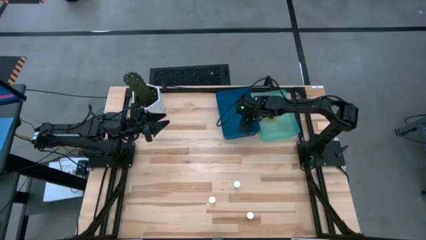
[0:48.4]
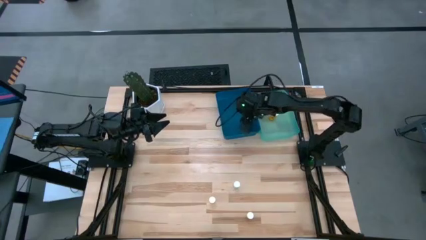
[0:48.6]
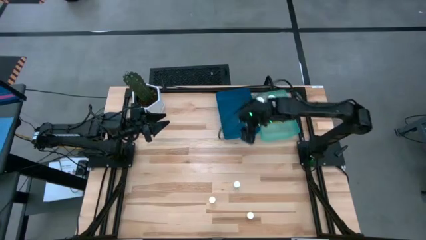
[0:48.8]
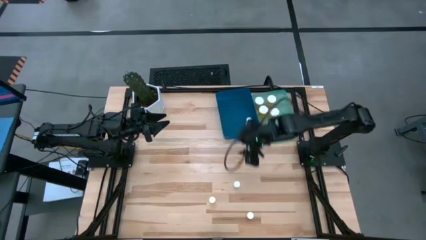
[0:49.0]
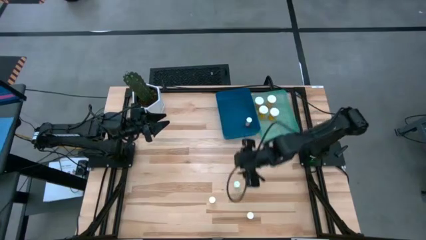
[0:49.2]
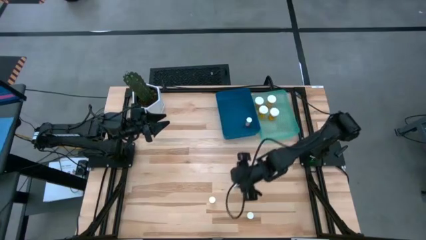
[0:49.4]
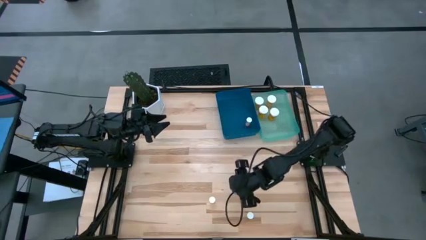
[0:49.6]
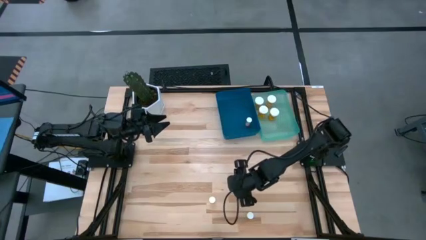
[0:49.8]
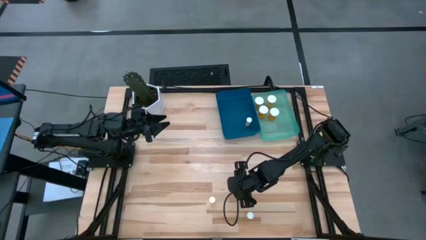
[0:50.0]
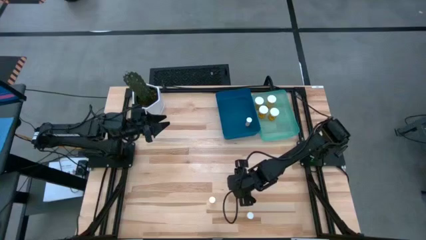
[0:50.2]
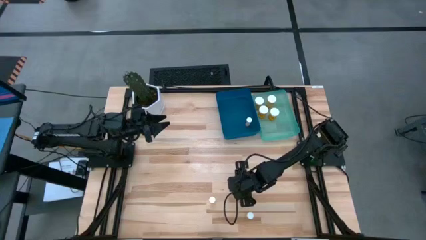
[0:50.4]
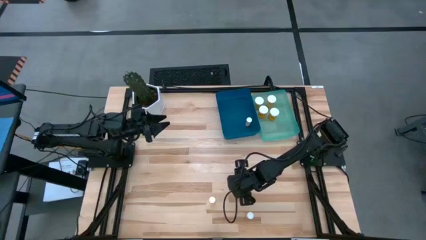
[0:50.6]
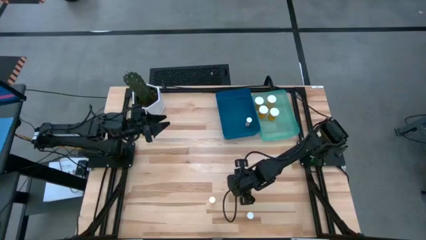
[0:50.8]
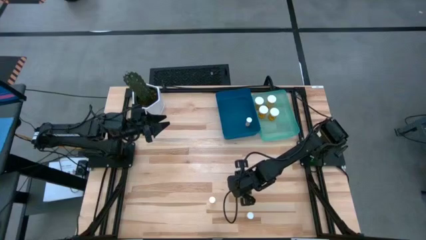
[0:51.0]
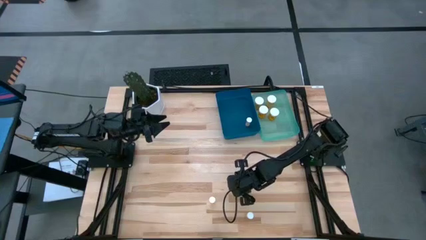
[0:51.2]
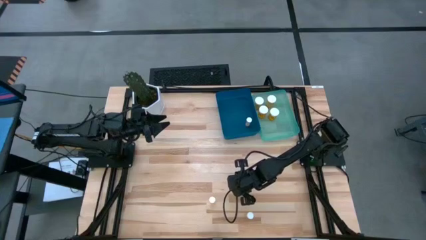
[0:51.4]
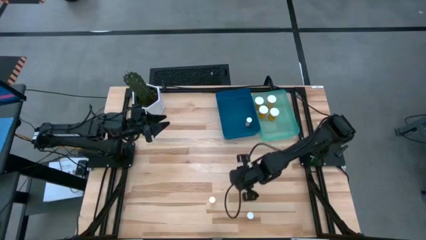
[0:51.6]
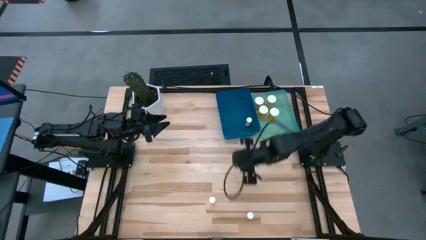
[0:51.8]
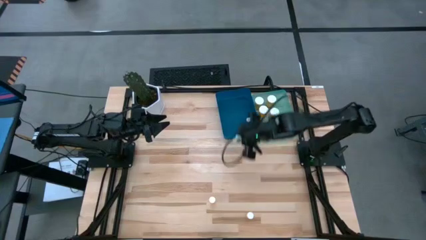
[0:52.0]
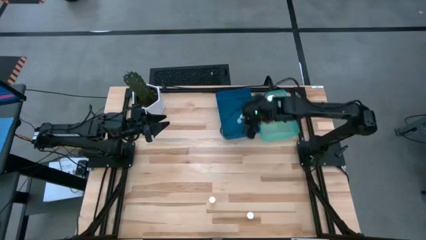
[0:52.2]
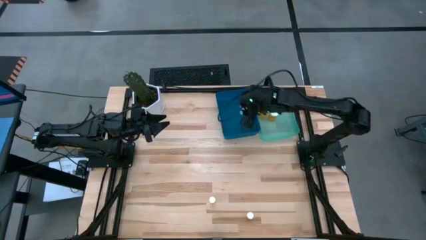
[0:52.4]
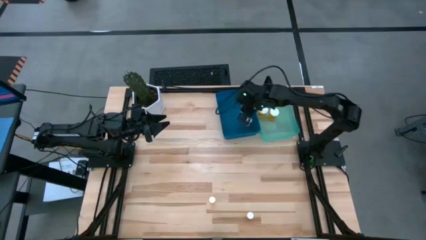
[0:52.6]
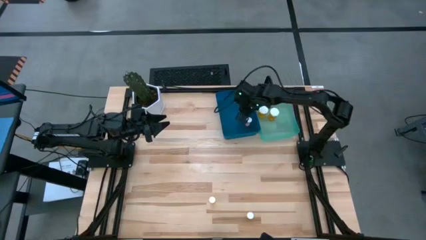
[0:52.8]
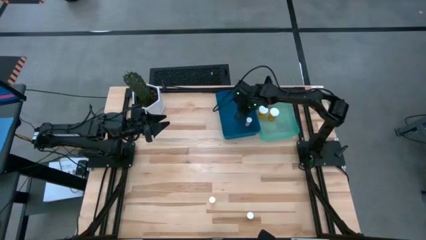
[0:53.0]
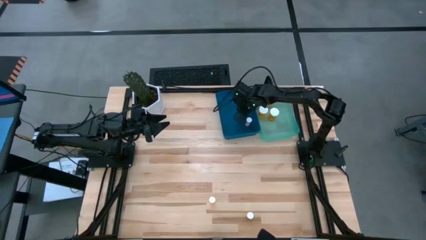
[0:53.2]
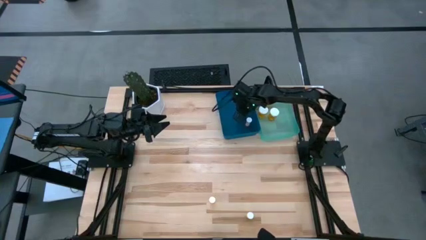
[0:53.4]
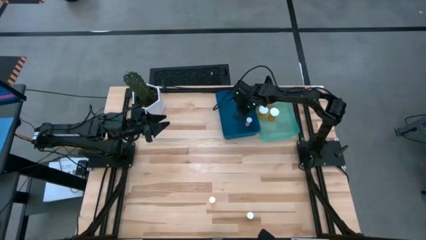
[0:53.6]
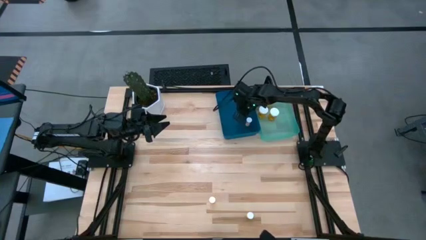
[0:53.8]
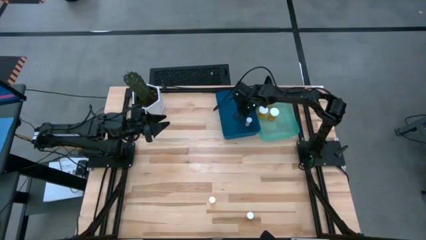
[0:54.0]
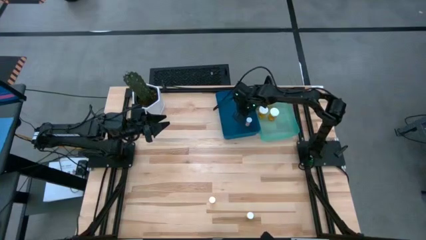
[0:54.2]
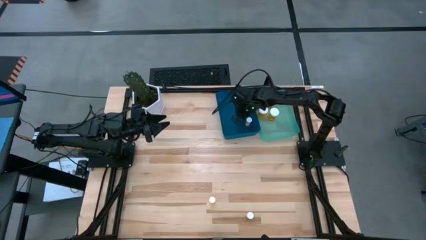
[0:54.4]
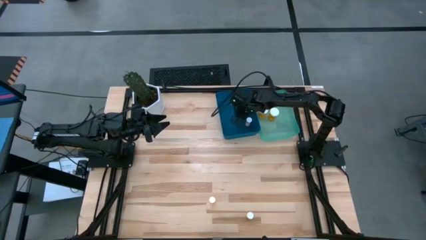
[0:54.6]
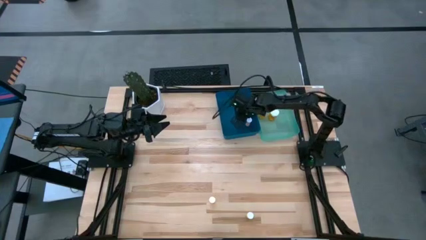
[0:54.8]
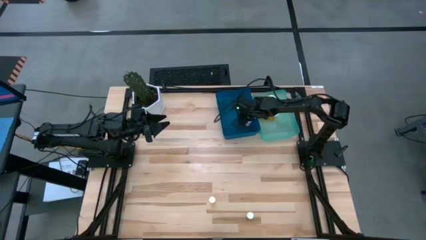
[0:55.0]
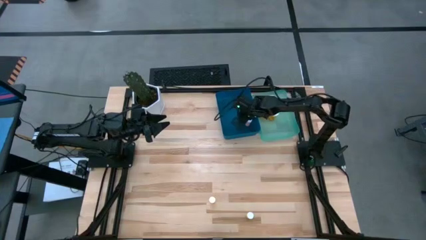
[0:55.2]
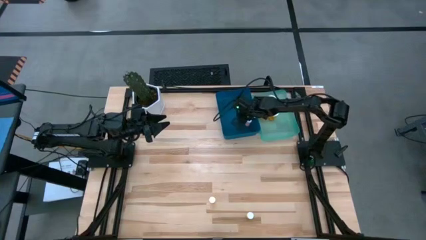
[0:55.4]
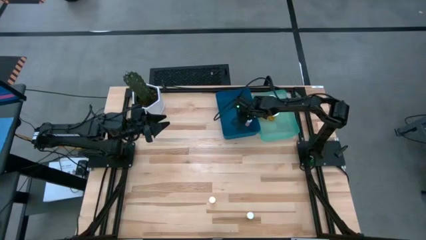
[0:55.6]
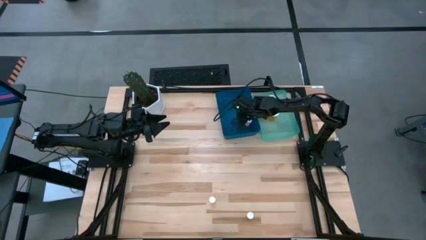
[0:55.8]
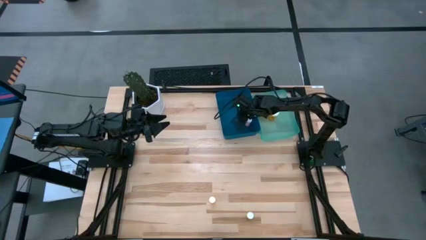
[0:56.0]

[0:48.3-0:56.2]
Task: Pick and place medicine bottles into bin by pill shape (circle, oval)
Put the blue tablet bottle into the dark blue bin

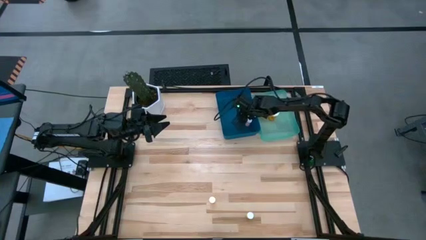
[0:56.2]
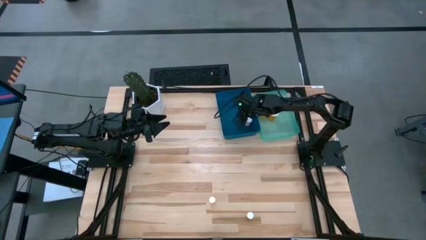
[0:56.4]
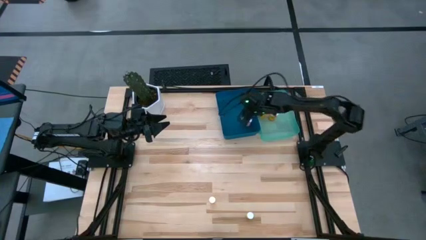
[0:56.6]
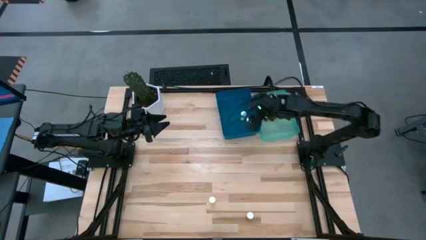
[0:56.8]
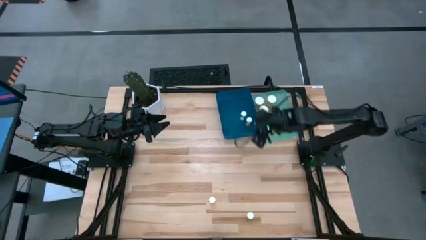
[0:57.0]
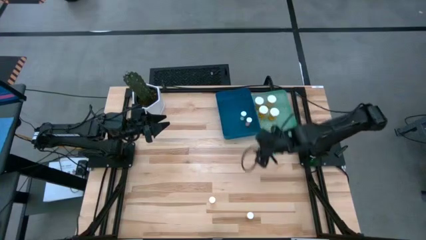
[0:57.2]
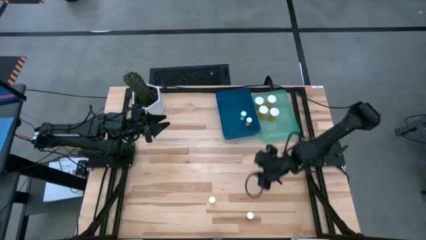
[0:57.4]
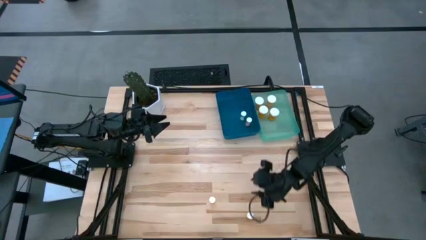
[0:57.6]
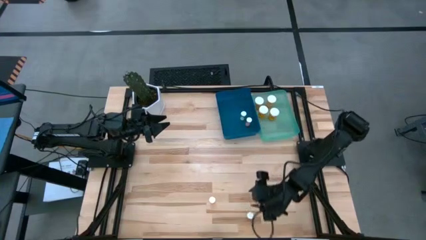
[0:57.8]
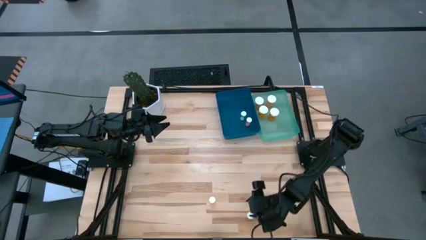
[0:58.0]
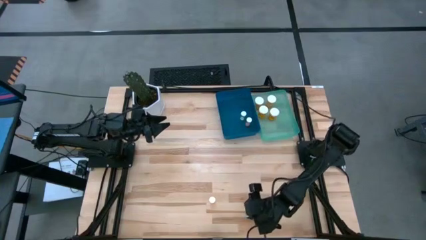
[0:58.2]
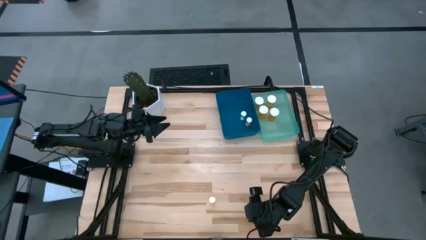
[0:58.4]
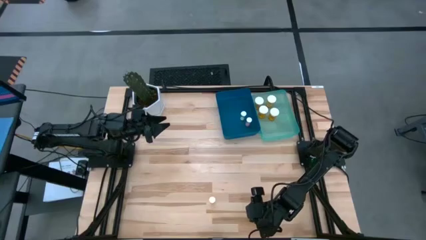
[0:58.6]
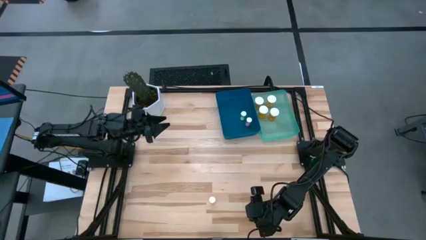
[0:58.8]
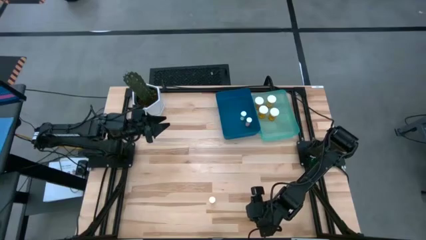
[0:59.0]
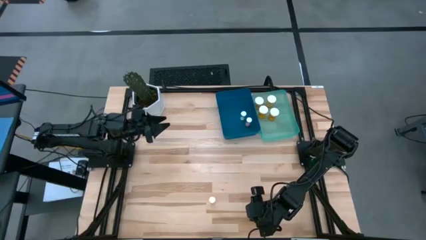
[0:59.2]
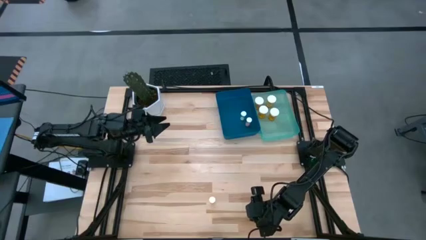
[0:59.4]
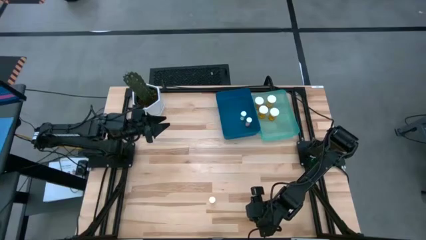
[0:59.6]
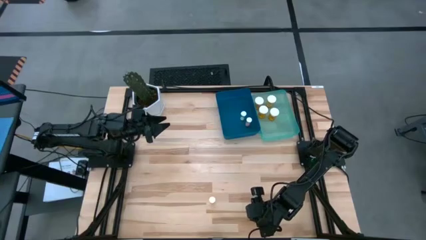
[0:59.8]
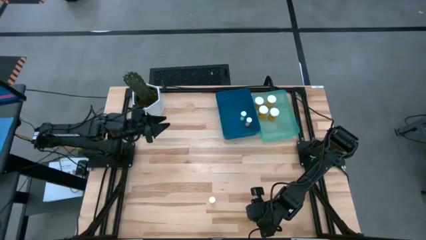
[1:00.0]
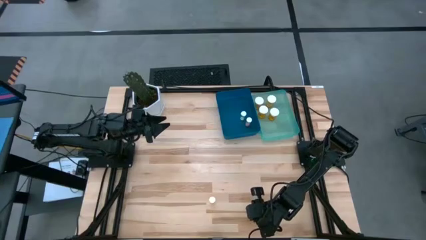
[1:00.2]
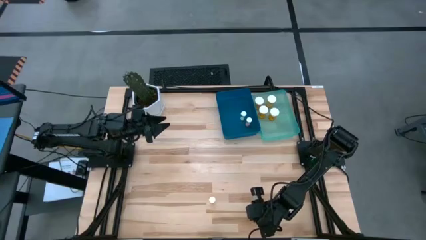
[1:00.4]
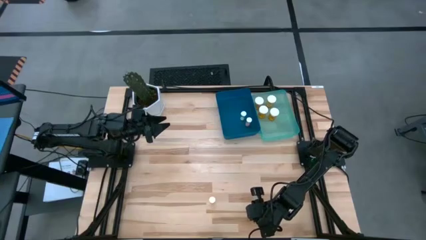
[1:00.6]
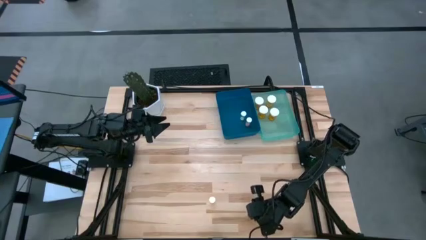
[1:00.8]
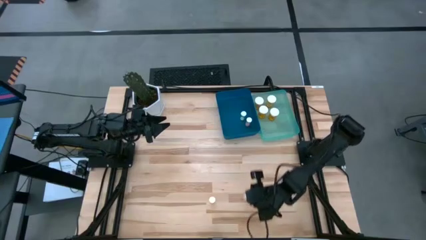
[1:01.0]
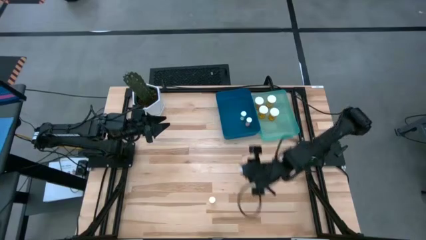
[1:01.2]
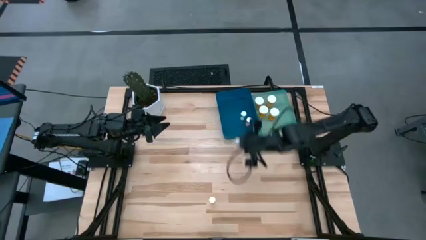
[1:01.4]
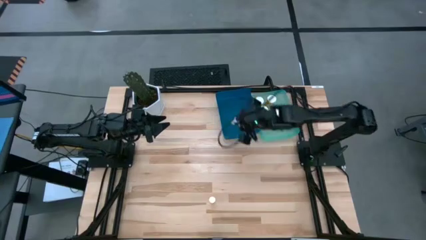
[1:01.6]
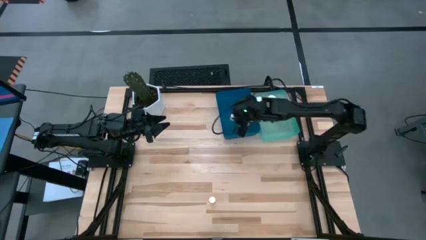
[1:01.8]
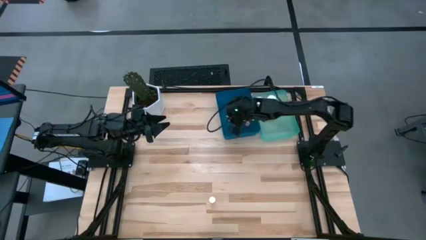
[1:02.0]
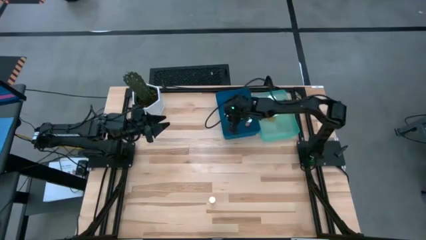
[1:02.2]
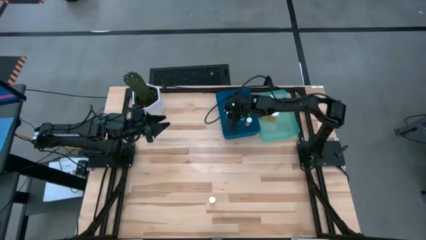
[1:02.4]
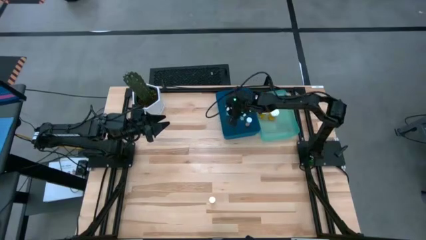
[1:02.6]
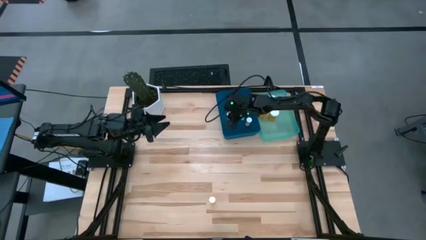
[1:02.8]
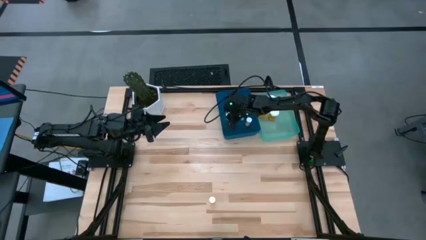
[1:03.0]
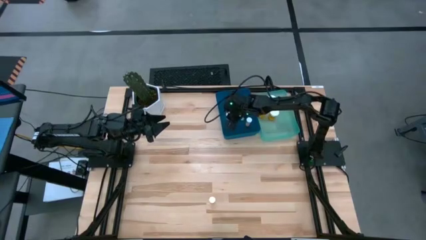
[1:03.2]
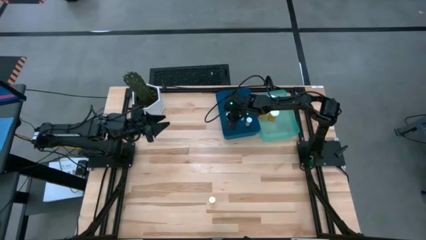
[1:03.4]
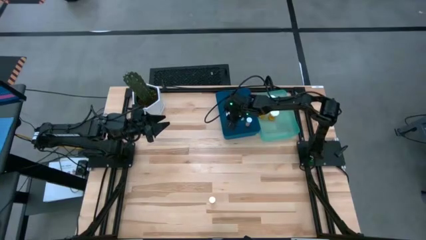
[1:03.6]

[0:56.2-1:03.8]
Put the yellow tablet bottle into the dark blue bin

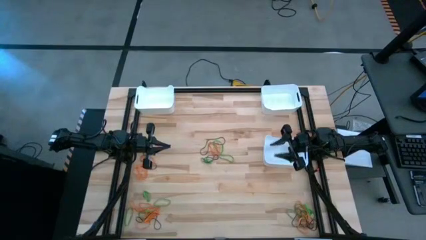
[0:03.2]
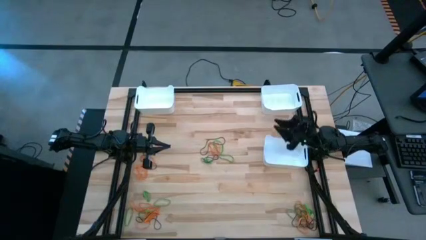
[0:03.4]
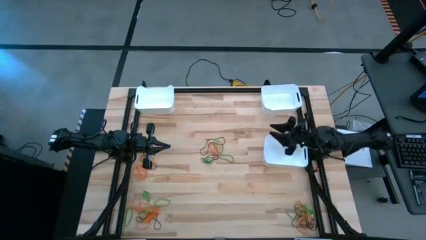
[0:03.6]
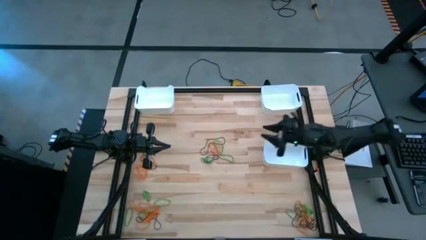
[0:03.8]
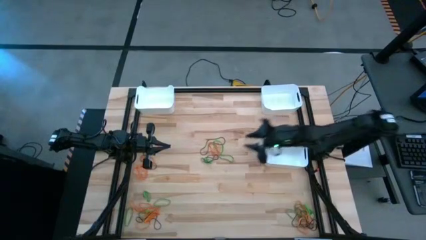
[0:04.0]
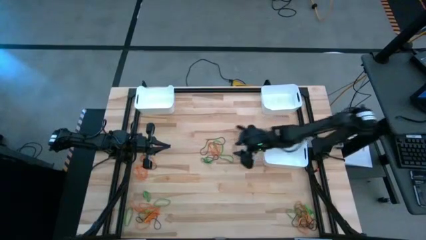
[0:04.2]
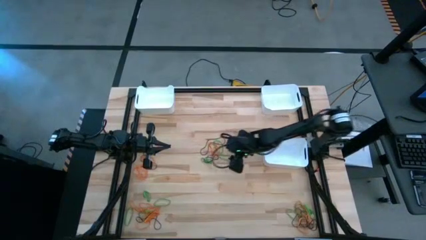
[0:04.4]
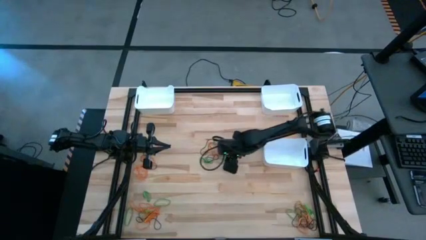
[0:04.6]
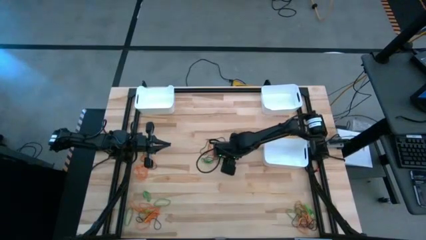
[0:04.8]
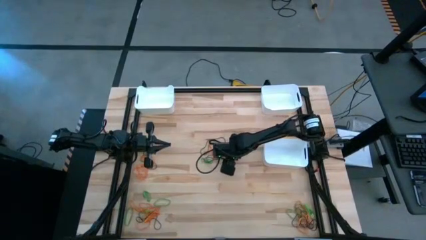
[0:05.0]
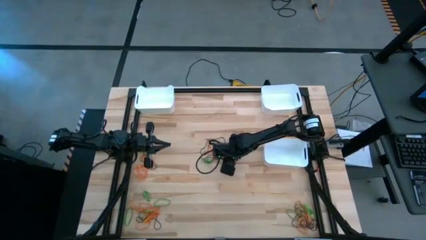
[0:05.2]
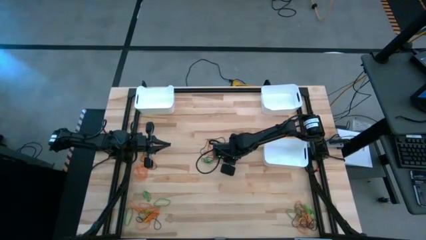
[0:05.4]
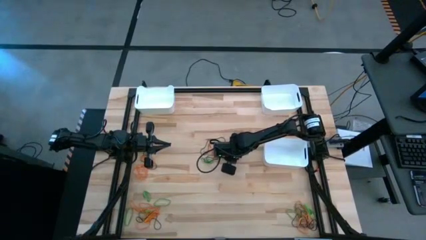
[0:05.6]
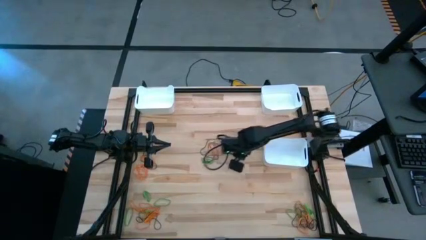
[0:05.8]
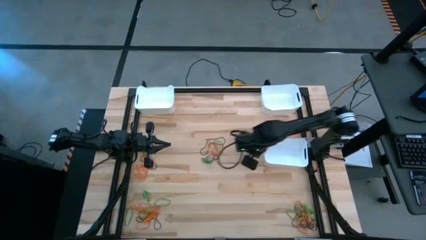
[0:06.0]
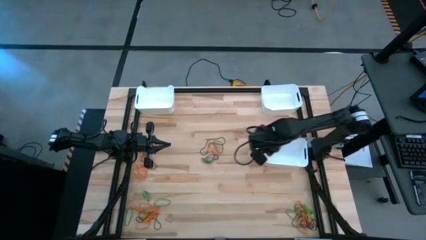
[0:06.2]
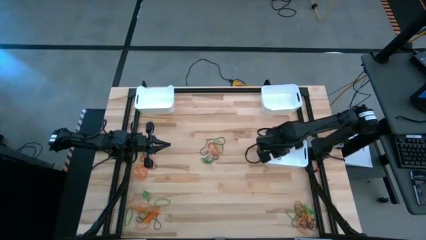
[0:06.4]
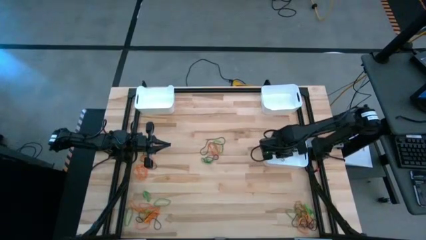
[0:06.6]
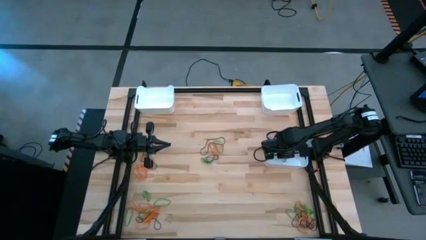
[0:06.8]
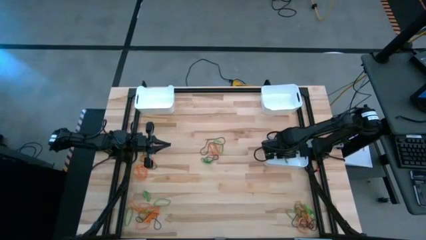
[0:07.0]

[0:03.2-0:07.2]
Task: Sort rubber bands into baskets
Put the green rubber band into the bottom white bin
